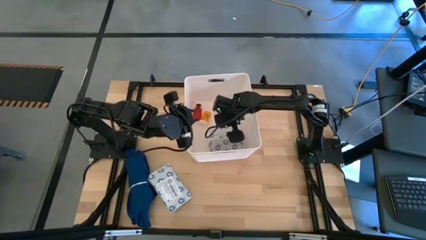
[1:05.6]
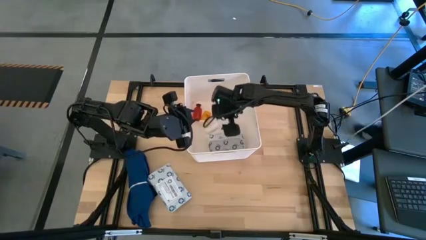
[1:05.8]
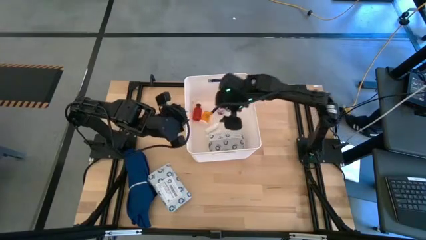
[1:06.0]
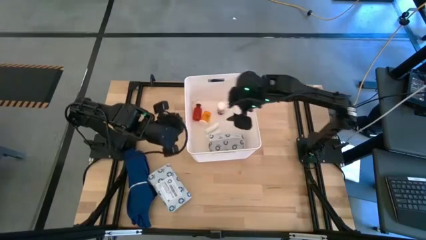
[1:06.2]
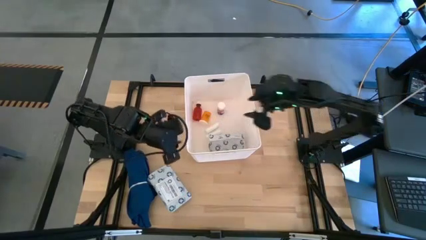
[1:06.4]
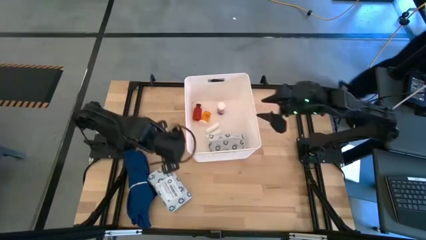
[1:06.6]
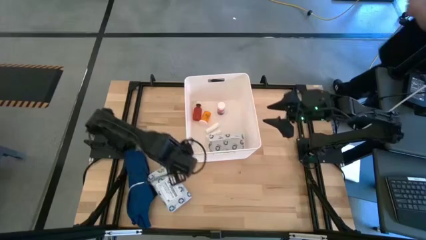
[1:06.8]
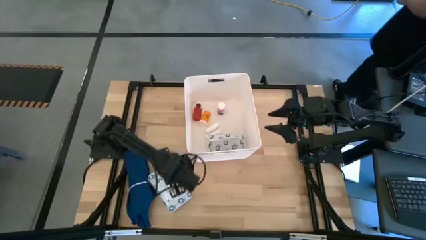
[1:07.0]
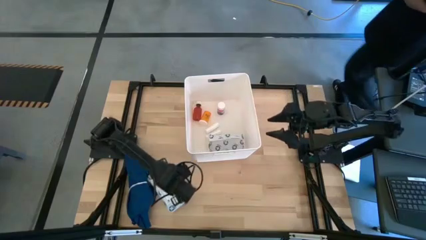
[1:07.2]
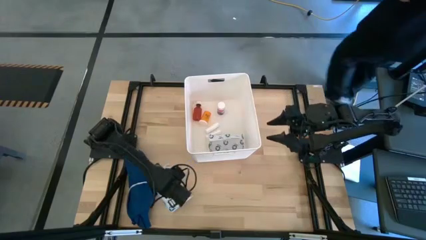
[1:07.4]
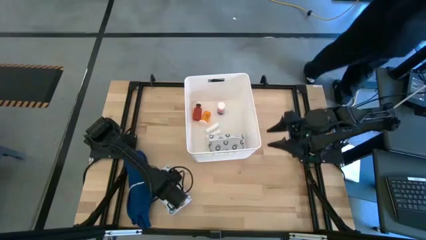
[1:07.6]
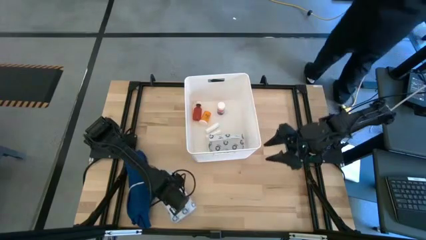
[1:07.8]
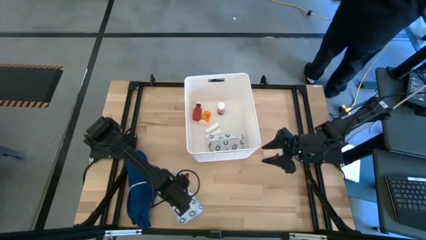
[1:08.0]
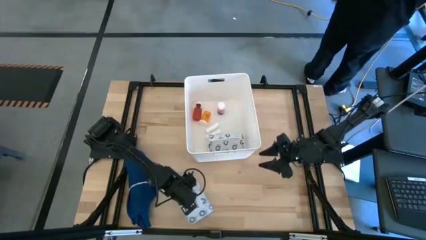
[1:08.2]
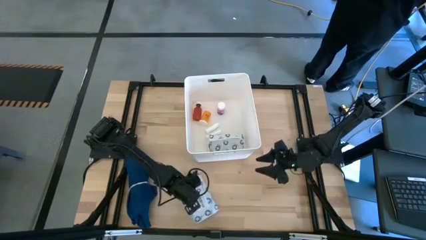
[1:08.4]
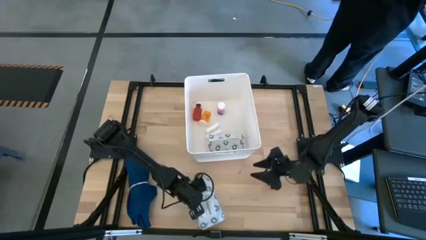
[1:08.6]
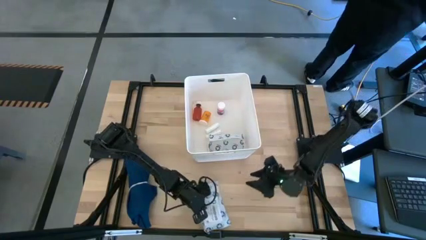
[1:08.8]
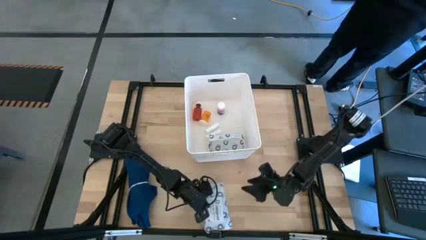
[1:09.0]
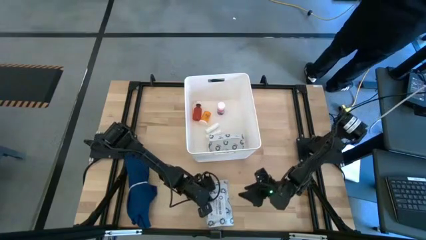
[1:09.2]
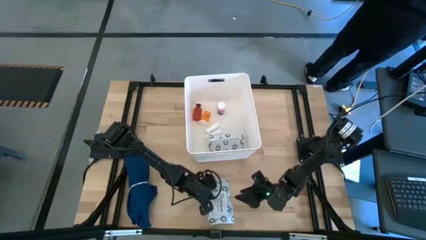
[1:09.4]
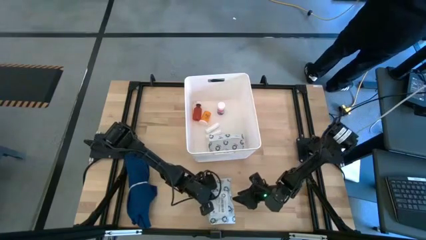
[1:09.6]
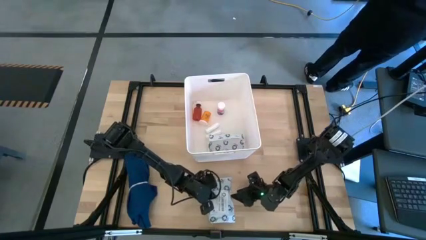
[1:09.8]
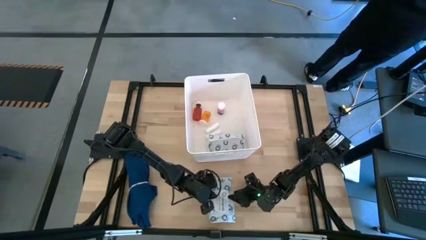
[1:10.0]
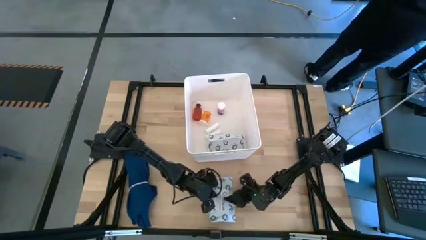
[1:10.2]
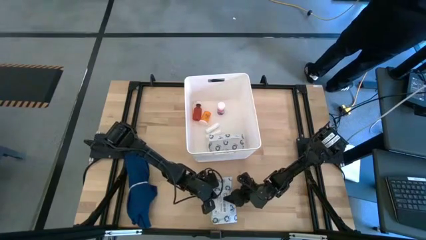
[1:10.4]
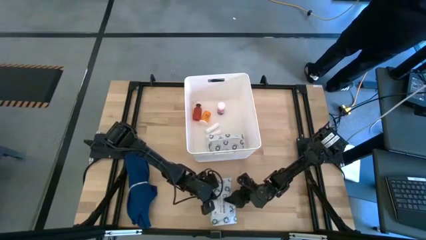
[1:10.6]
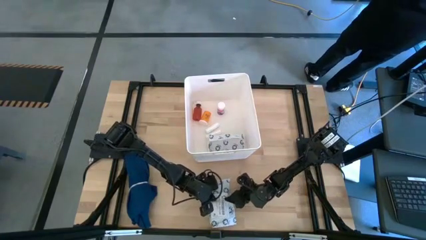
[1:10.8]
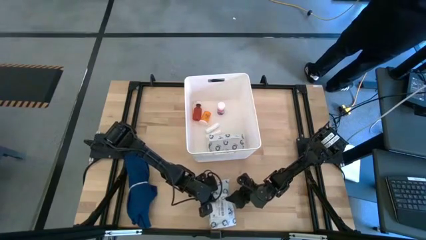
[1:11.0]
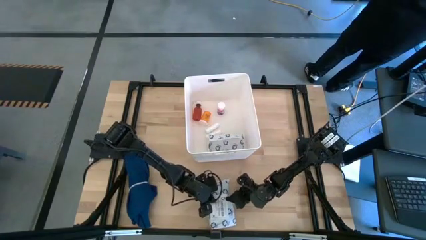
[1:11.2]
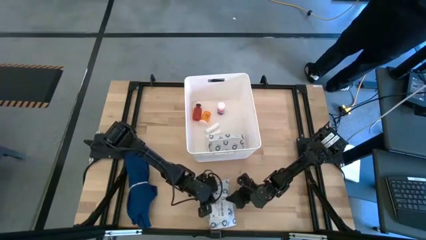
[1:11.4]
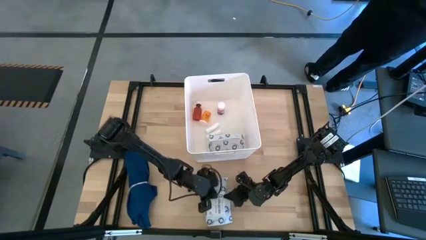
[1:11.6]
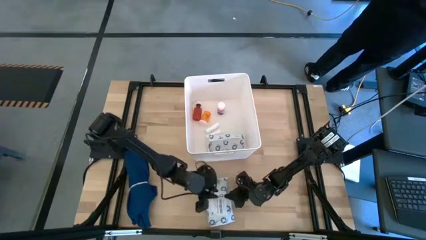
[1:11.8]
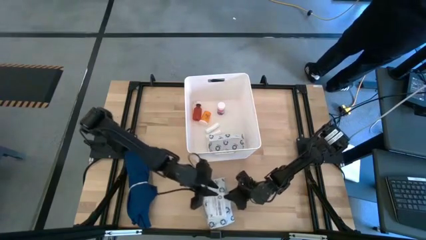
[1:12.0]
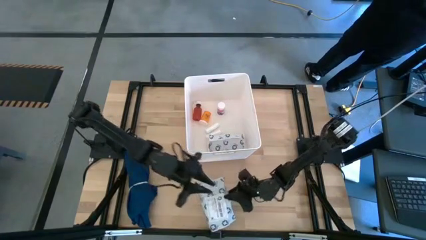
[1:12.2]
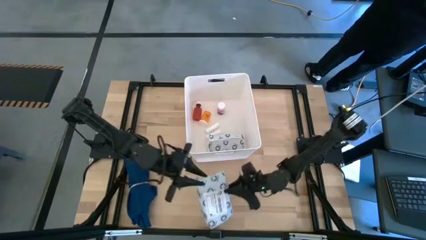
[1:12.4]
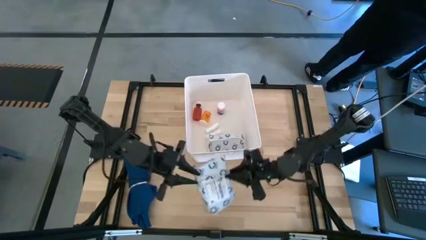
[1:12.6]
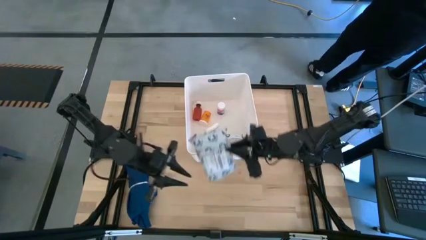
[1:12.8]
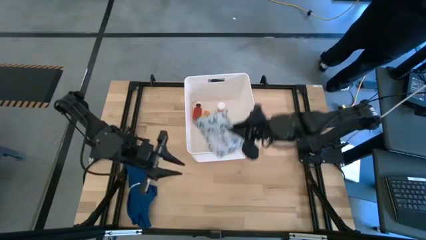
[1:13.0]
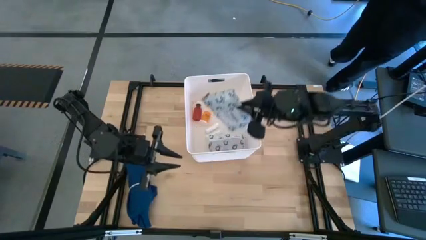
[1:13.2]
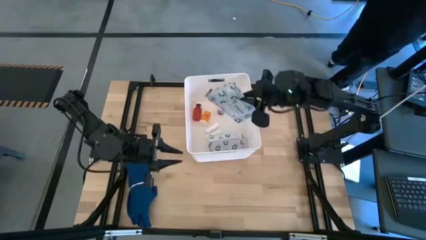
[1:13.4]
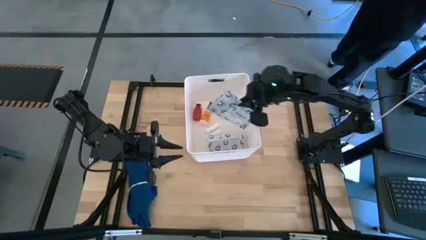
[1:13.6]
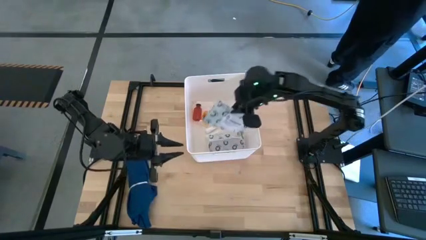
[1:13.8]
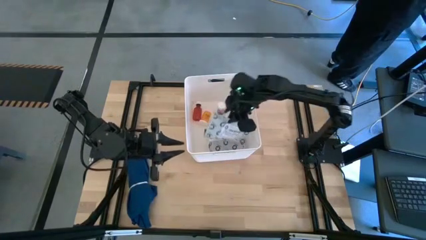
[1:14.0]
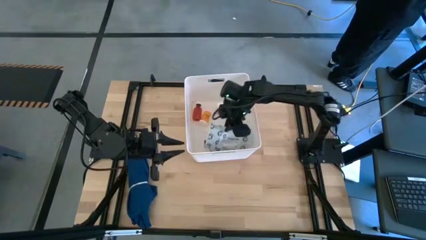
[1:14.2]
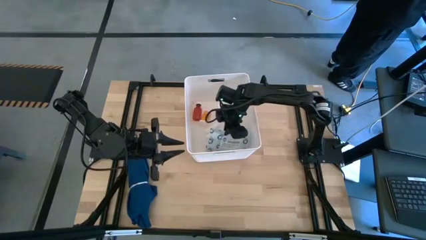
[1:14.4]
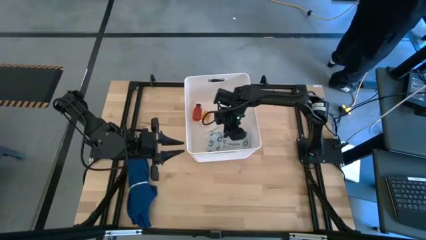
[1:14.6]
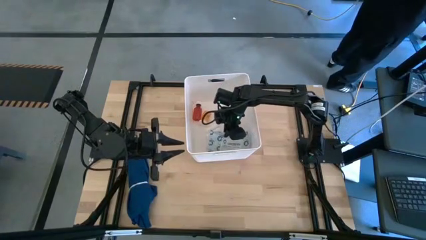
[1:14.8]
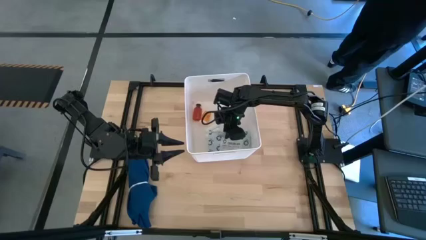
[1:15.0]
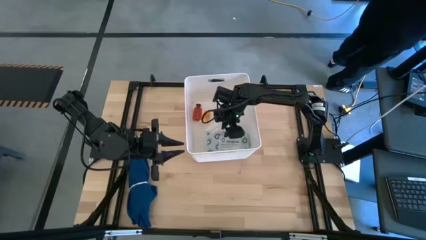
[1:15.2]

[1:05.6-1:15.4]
Task: Pick & place medical supplies in basket/bin
Put the mailer bag into the white bin

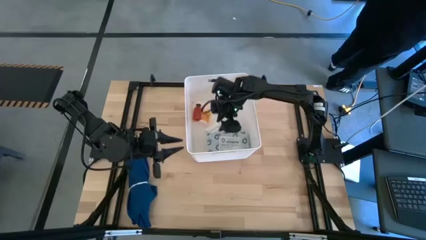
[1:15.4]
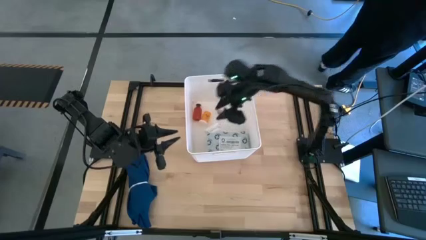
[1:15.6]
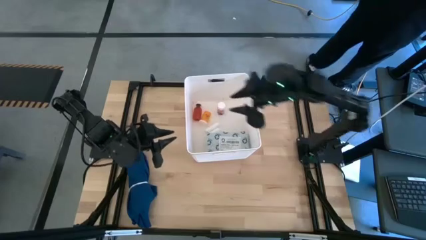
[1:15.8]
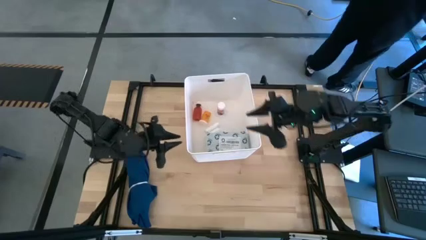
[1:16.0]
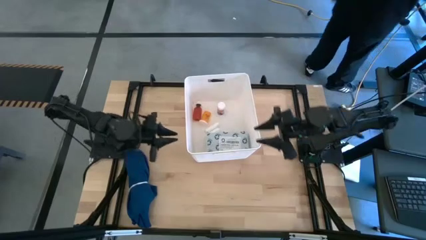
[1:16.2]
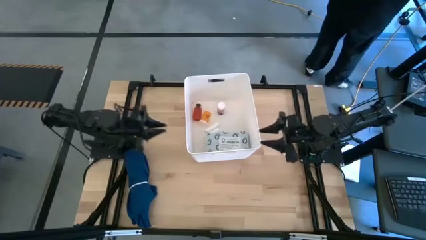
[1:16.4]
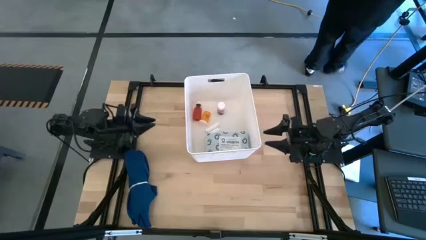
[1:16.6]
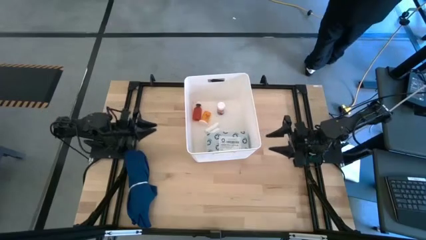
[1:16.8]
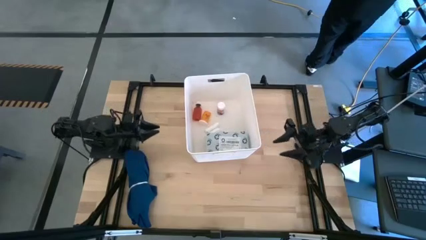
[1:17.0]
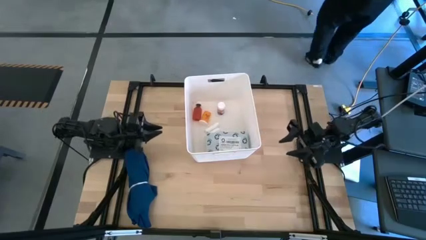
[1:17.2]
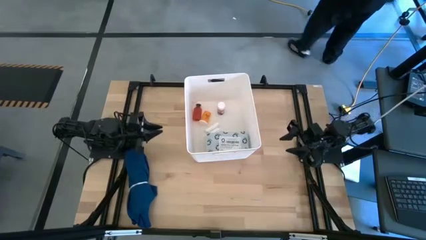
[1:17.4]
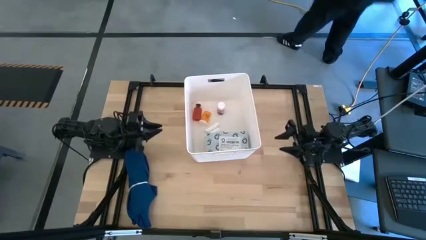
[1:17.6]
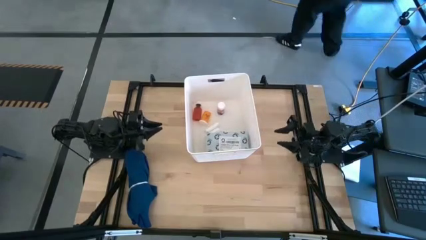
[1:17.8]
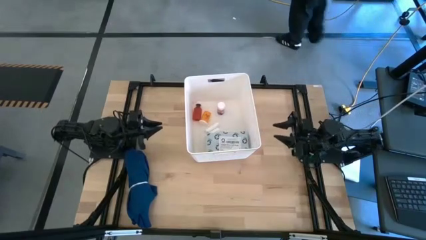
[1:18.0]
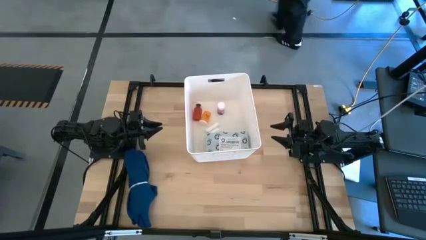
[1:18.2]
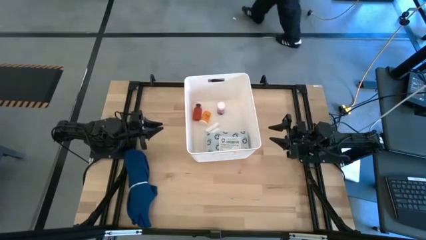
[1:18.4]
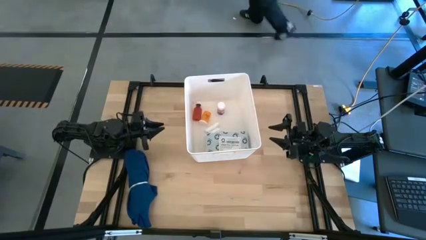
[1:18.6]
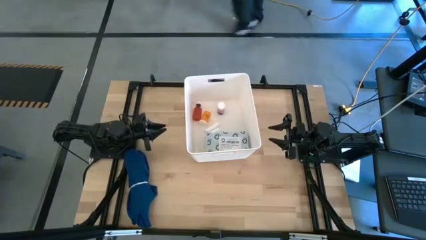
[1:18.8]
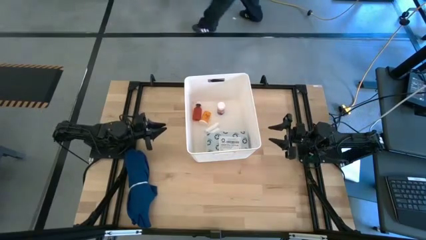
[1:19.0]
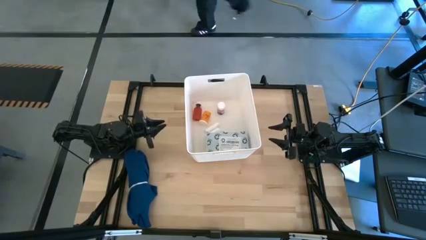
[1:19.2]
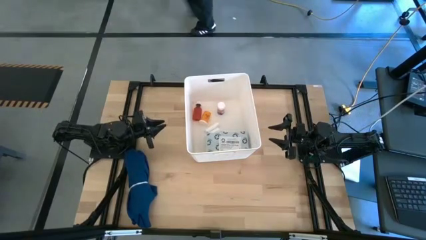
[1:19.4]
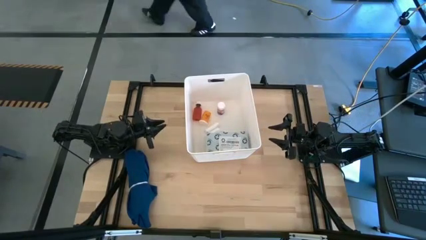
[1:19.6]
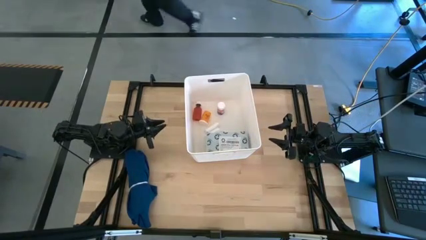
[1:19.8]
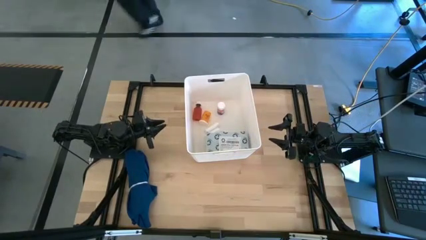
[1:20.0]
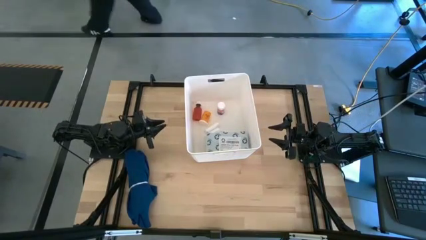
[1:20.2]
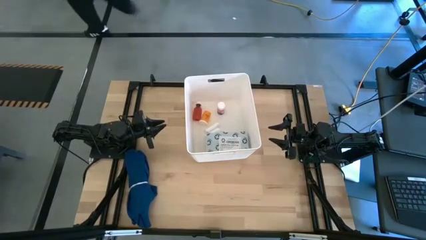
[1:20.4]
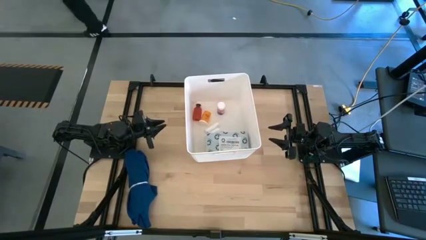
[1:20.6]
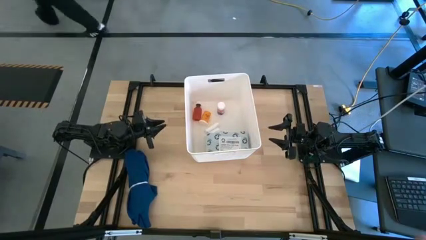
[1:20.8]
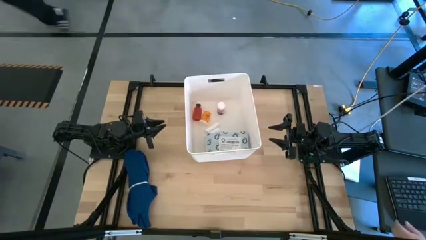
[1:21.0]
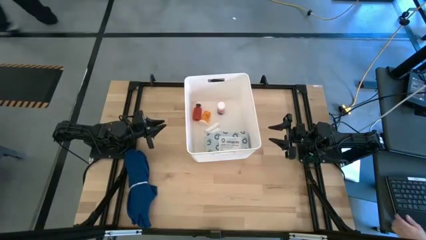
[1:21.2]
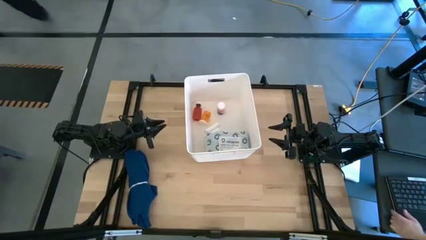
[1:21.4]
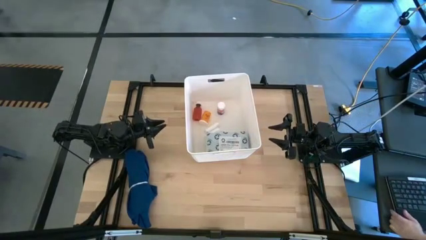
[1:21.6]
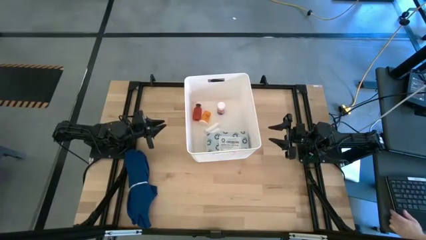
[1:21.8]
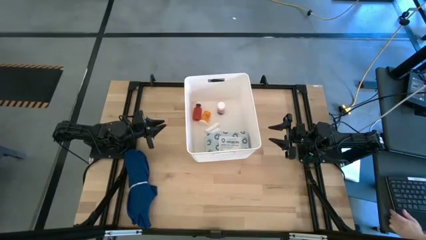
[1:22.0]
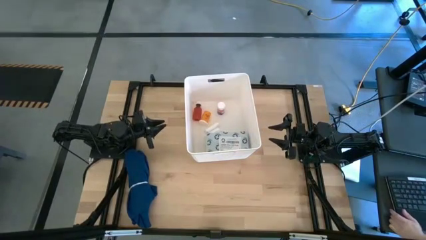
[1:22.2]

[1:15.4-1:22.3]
Return to Home Position
